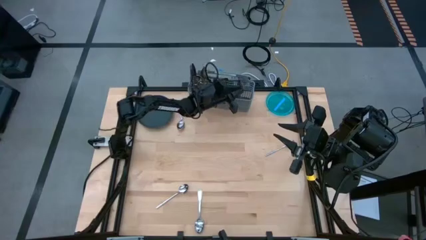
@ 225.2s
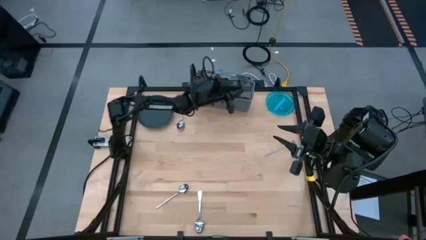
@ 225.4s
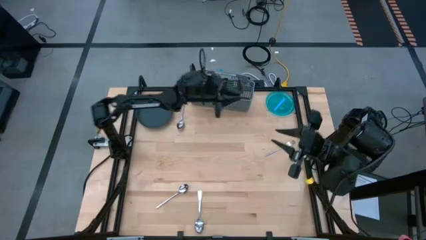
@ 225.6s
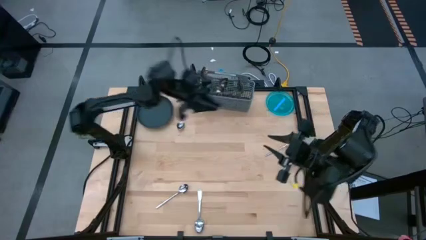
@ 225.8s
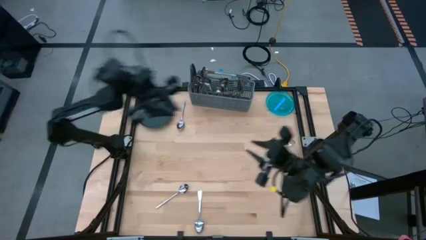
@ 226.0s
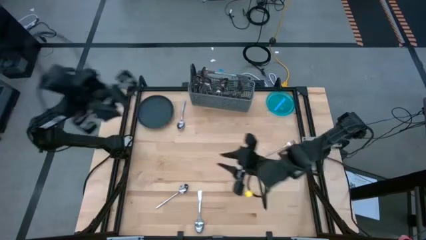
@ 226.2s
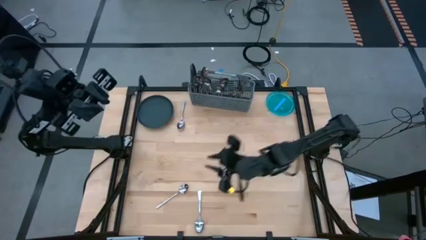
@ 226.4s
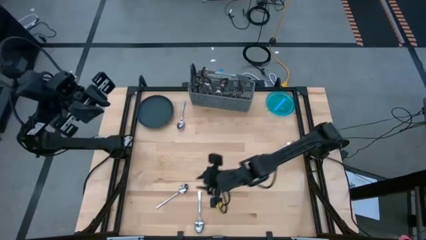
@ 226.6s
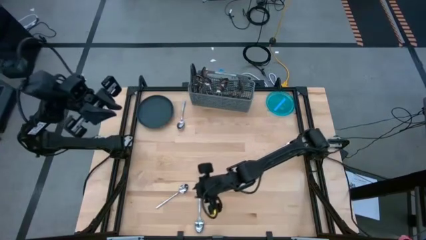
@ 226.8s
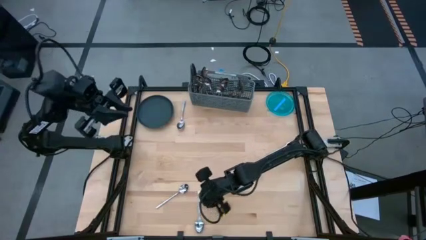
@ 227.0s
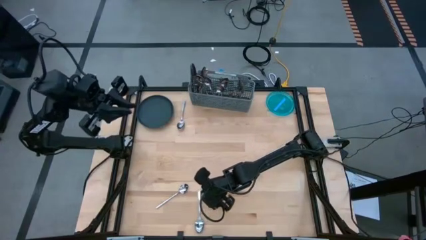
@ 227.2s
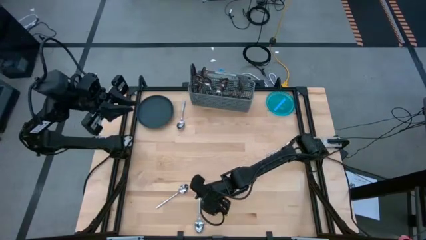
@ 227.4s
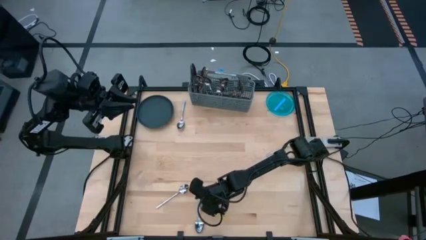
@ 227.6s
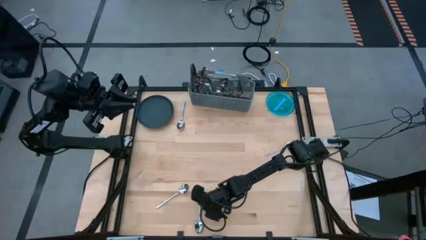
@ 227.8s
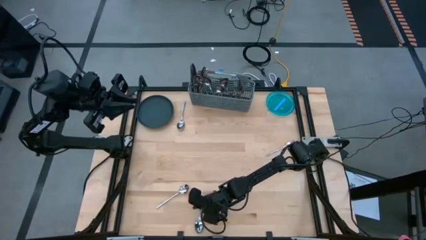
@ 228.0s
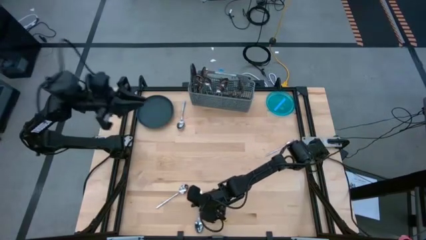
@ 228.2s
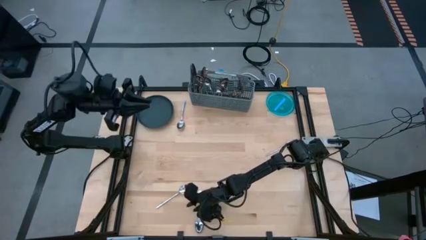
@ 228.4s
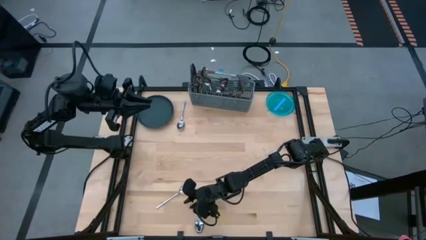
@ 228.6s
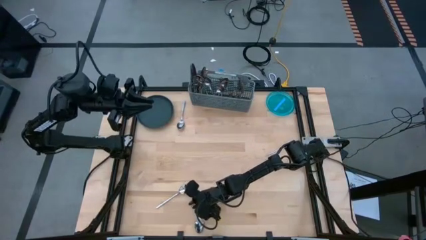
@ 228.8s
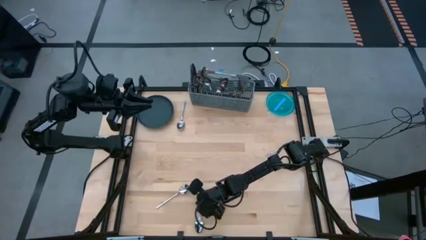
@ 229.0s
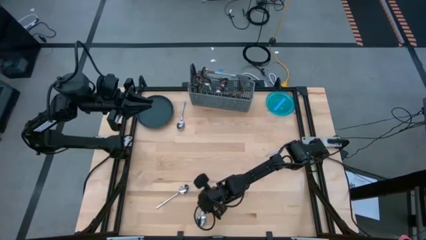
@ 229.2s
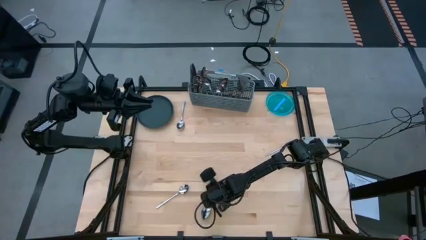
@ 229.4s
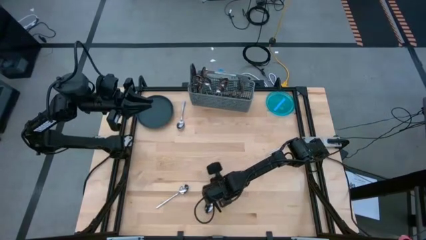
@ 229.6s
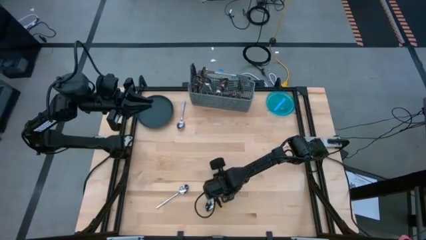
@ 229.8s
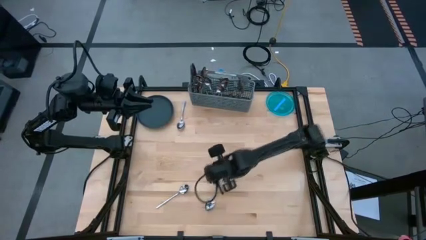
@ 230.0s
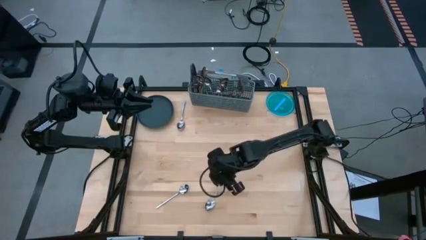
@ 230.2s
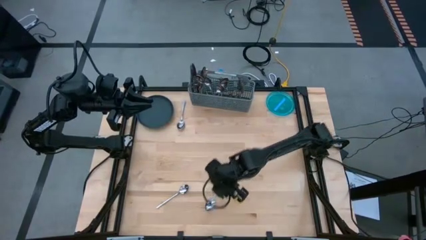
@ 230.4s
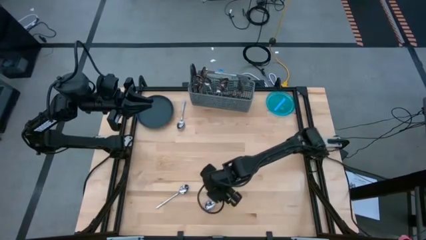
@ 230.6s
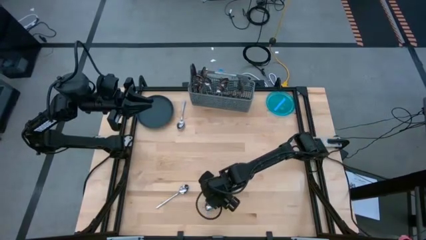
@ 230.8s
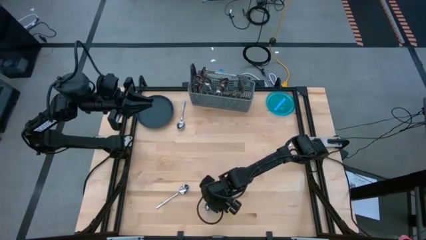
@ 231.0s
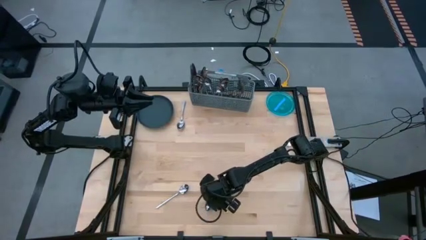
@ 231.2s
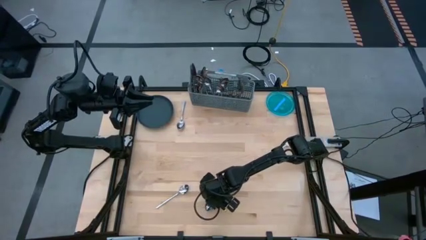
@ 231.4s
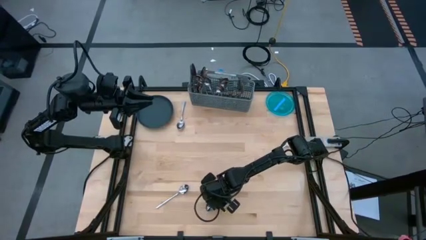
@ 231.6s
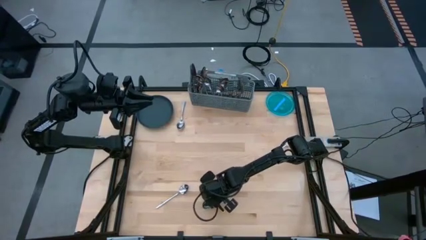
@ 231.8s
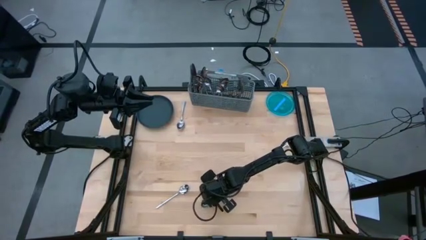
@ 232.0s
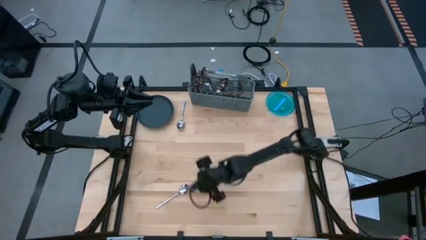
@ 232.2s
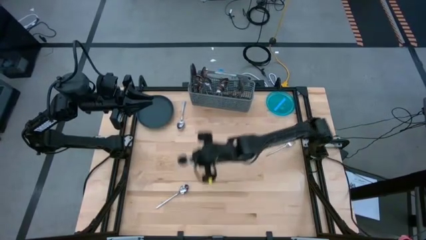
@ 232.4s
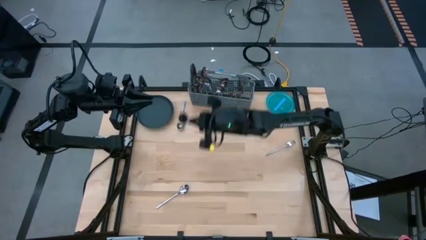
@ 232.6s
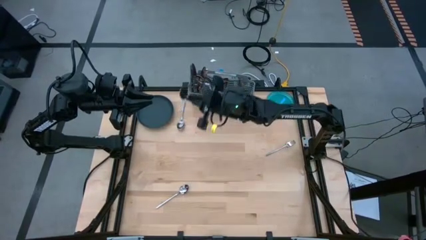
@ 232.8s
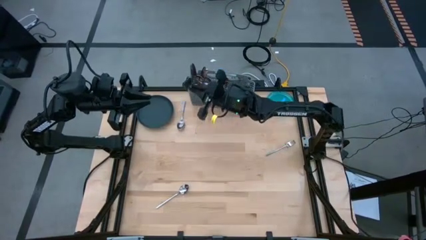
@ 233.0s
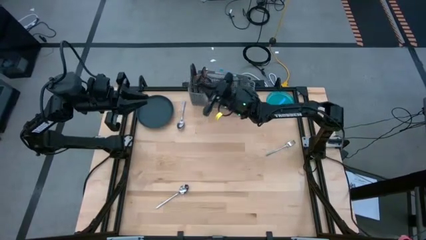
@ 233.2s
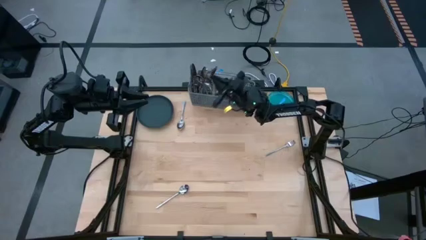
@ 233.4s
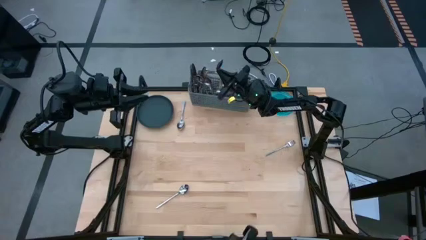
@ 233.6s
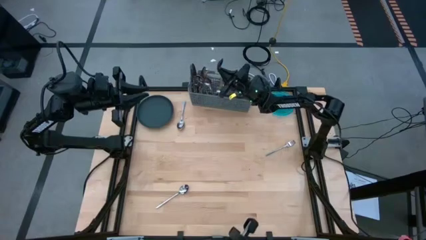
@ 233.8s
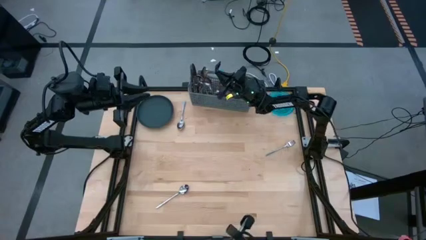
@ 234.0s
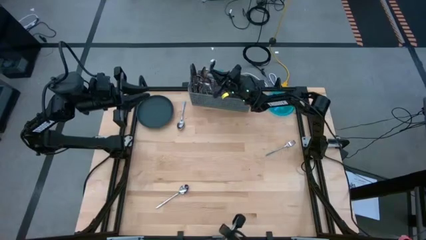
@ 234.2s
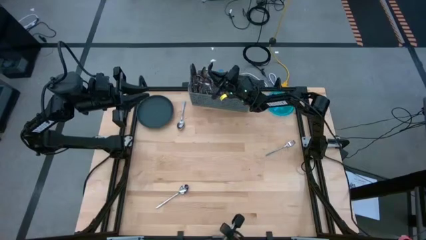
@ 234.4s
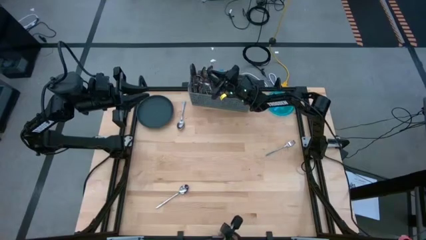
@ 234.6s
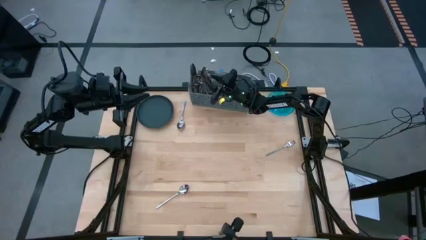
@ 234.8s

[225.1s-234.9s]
Task: Sort silverware
Put the spoon into the silverware basket
